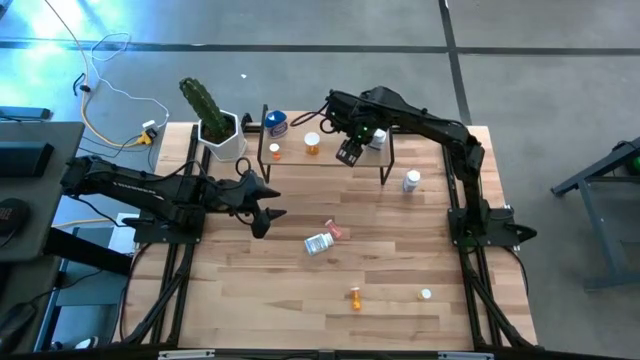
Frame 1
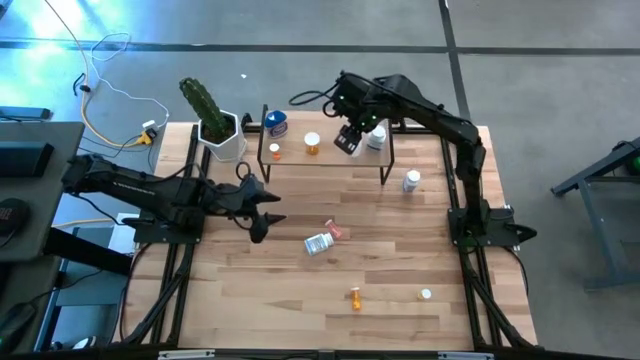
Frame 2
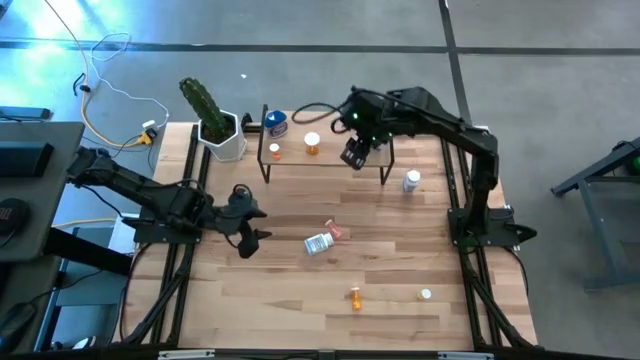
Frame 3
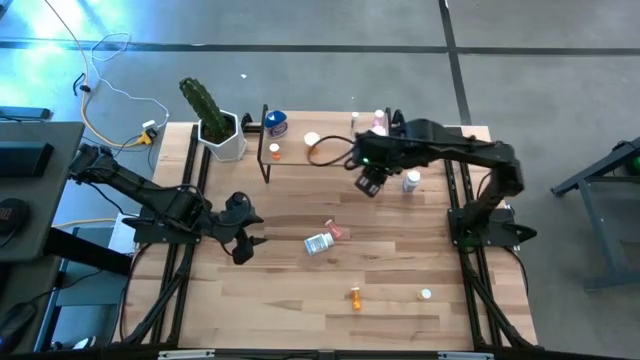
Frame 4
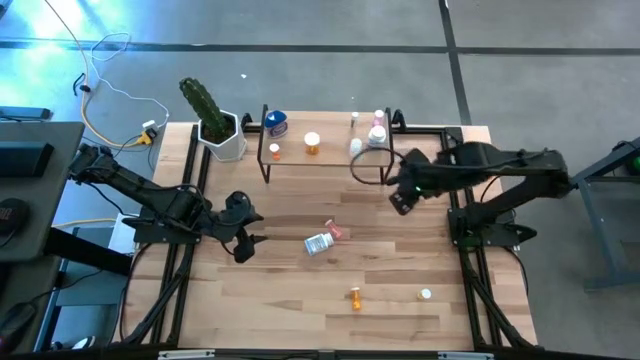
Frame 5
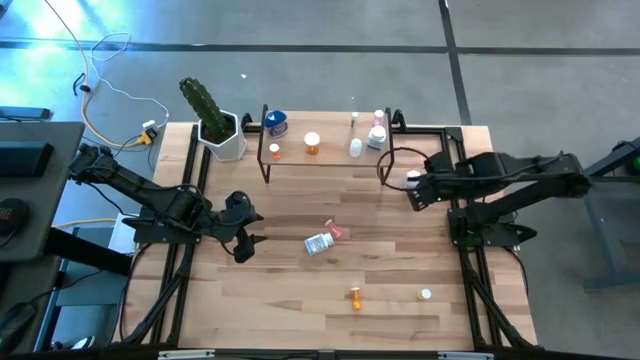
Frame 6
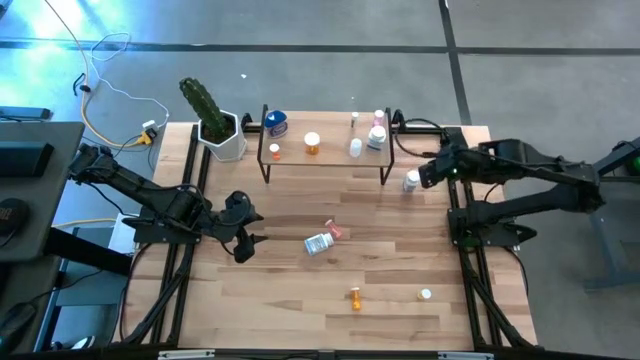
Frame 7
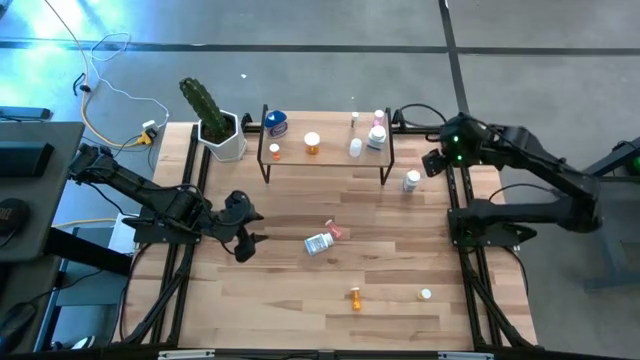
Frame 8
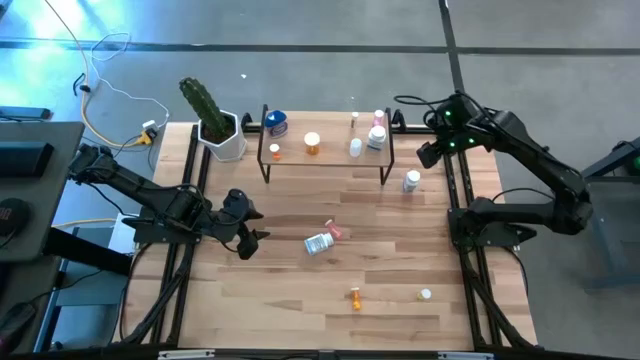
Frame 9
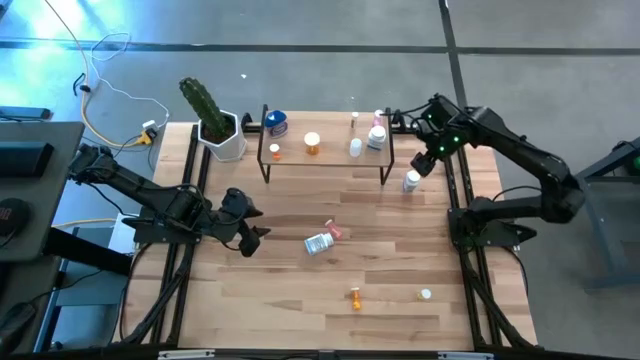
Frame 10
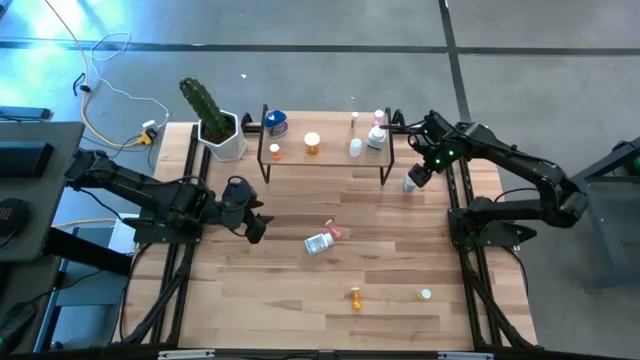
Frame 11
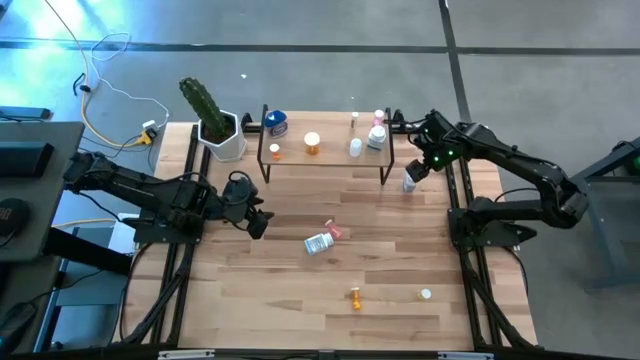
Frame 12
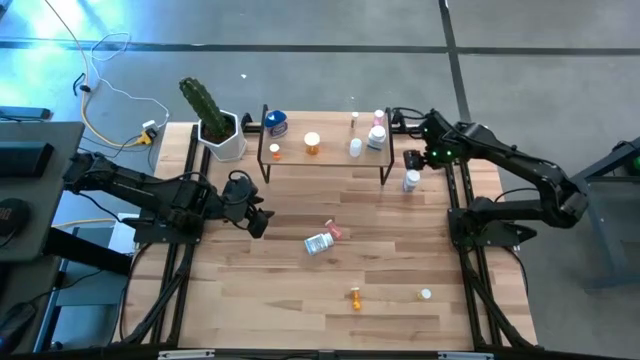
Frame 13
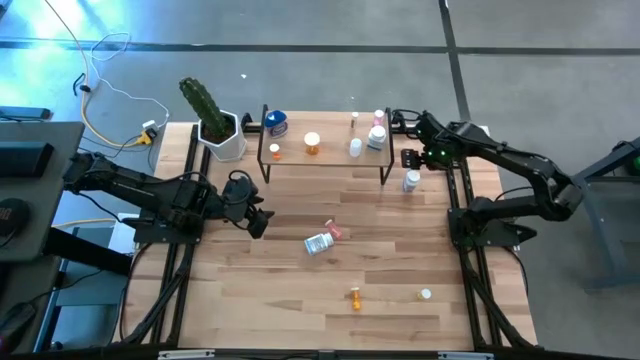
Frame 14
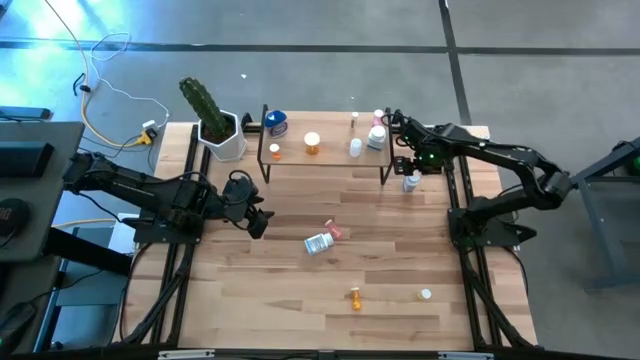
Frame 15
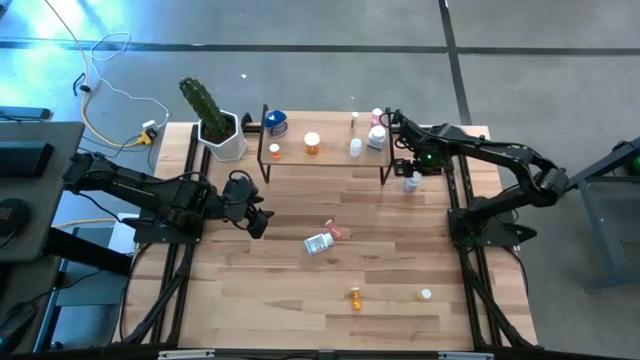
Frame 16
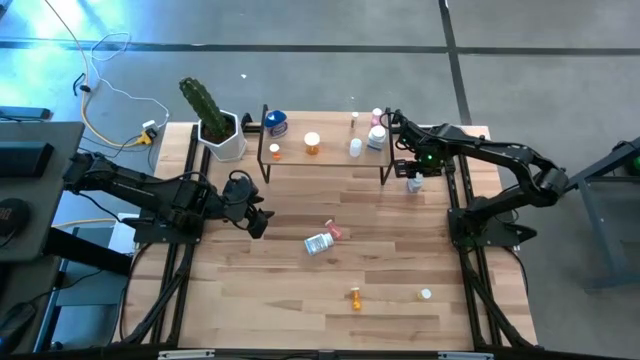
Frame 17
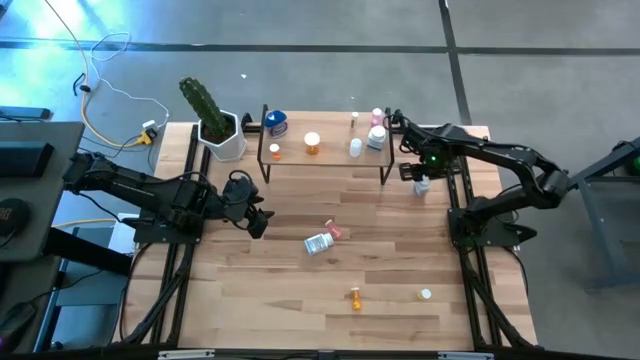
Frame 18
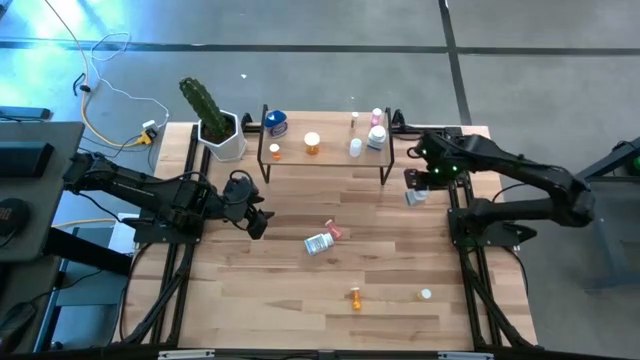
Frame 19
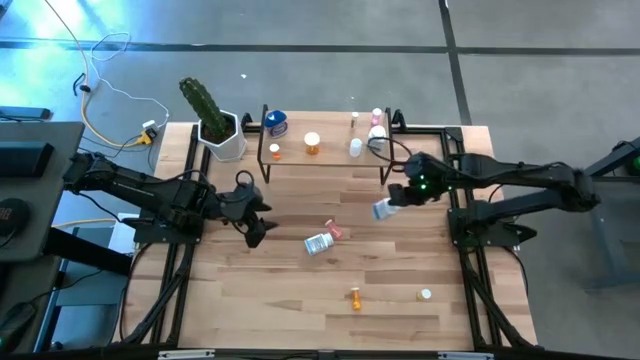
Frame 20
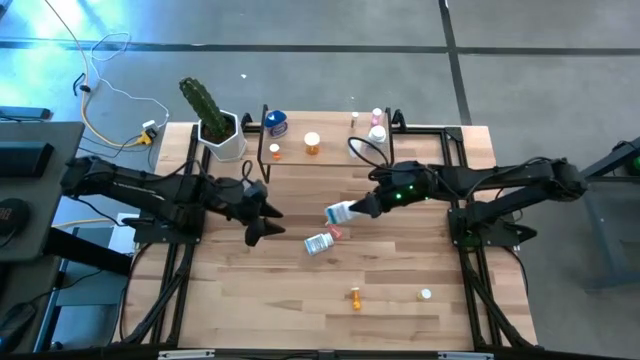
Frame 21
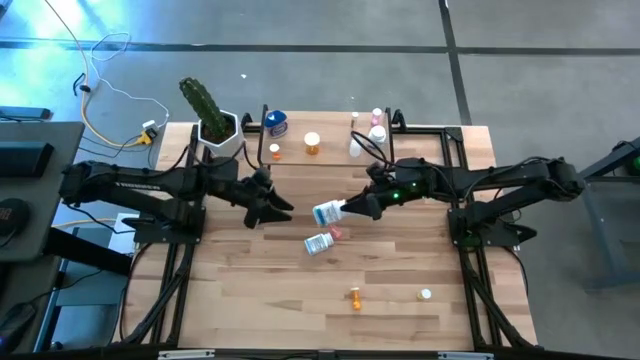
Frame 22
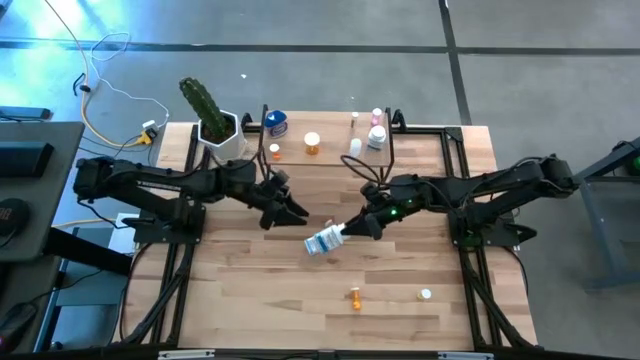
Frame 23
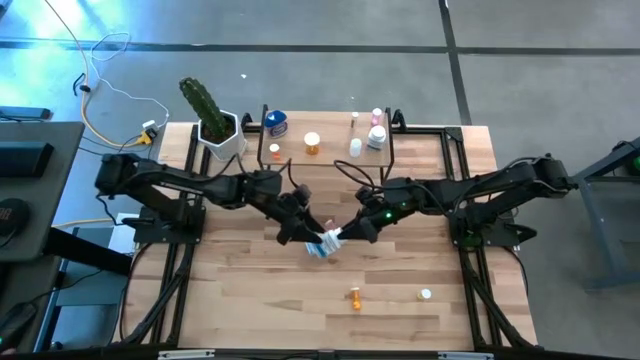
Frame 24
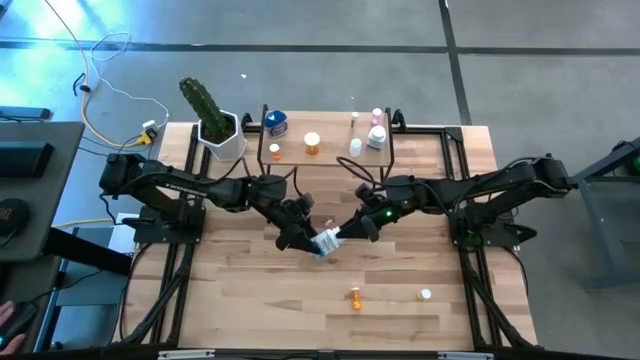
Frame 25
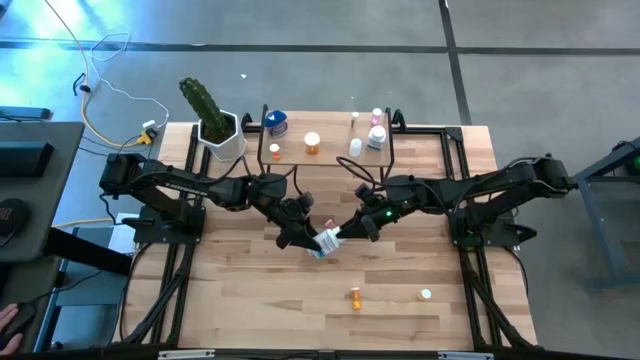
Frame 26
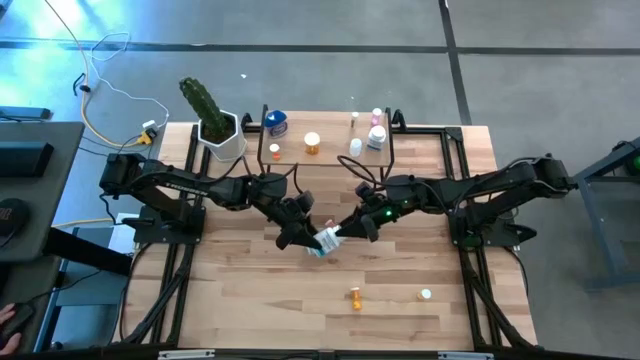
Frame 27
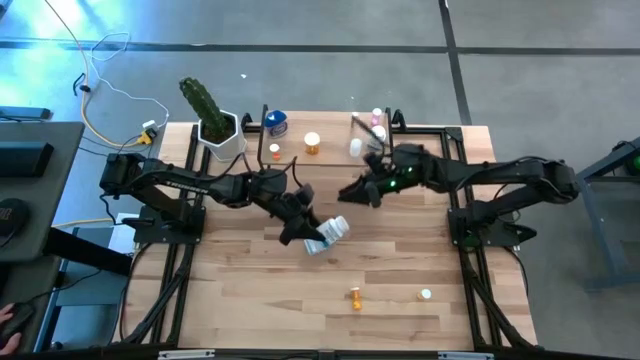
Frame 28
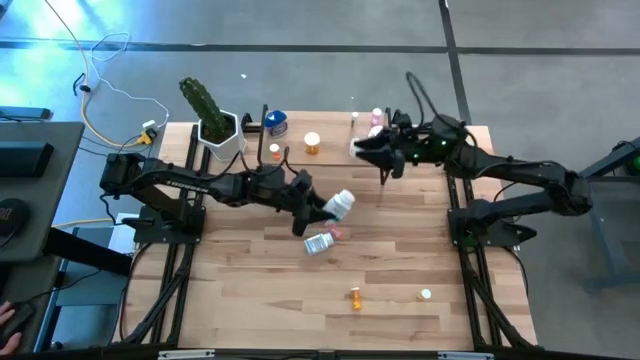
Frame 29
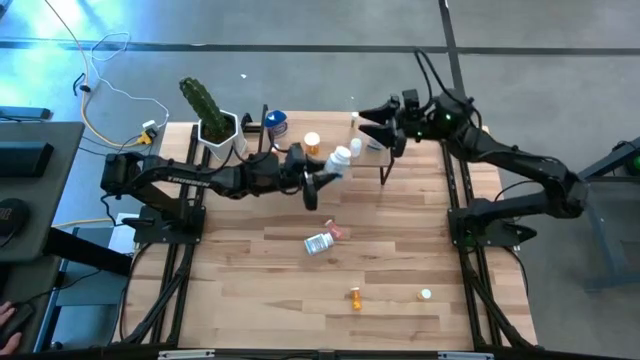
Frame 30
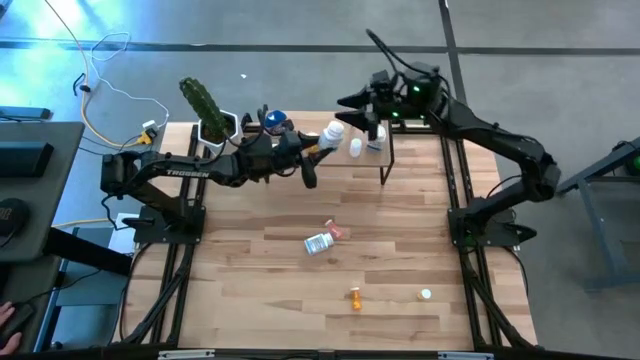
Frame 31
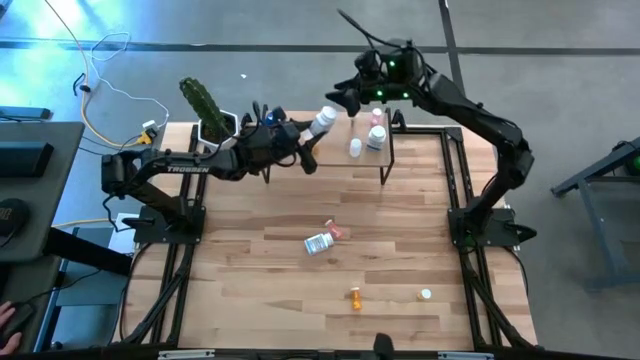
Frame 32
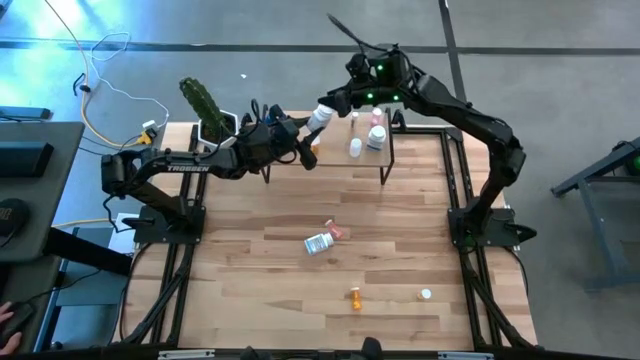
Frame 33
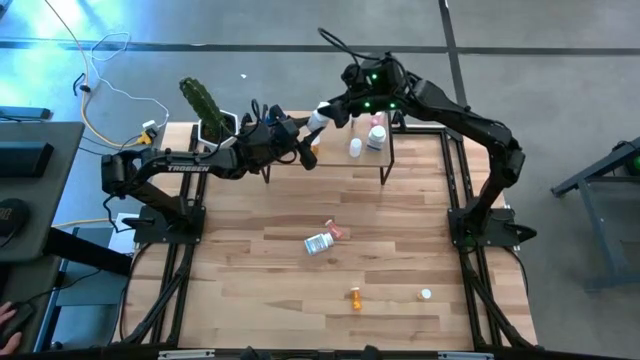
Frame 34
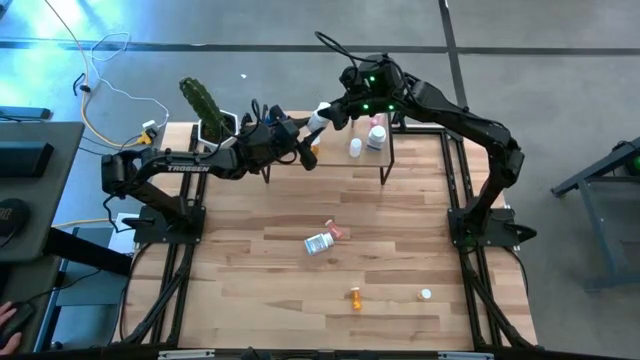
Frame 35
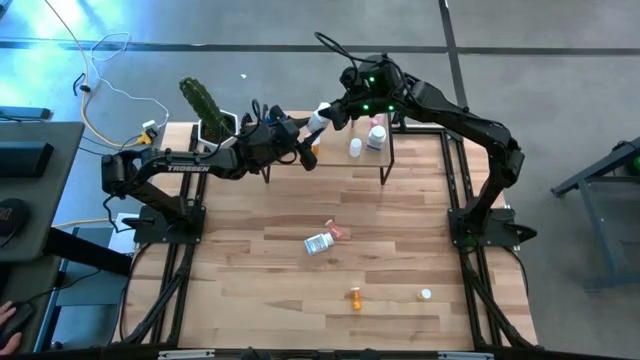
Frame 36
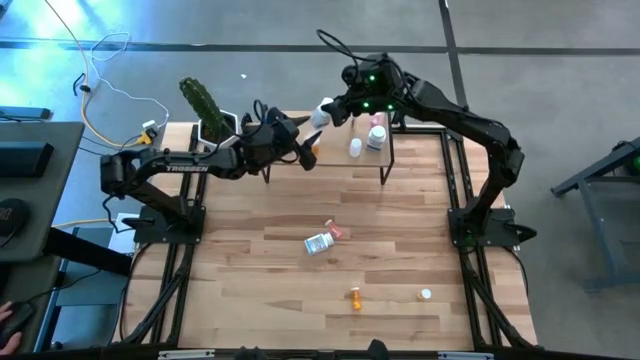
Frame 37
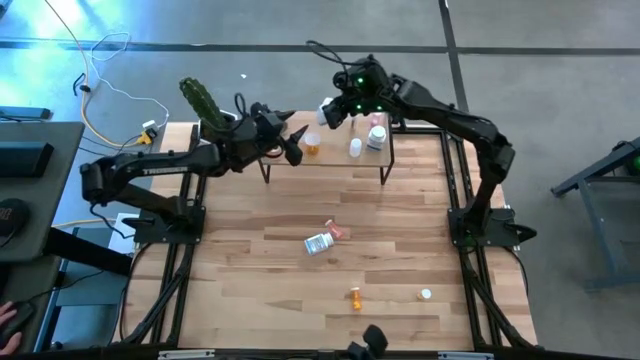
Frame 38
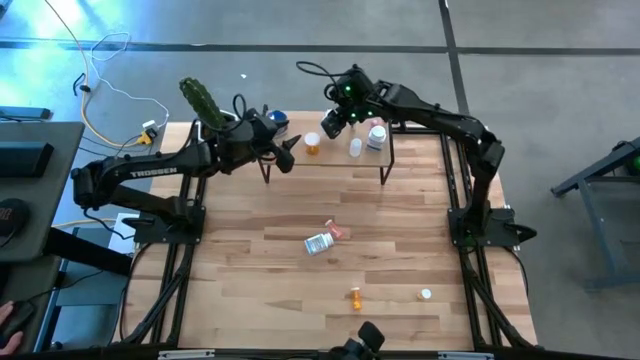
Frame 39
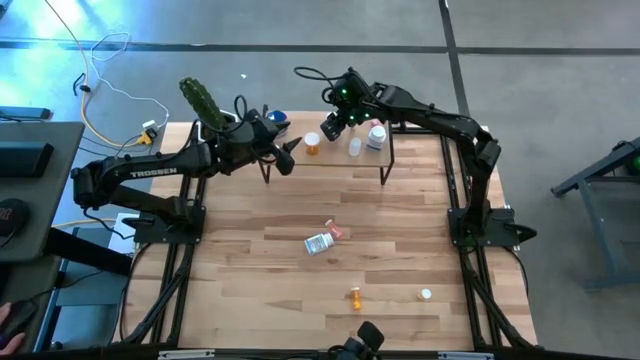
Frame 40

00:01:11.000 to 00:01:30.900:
Task: Pick and place medicine bottles onto shelf by color
Put the top big white pill bottle on the shelf
